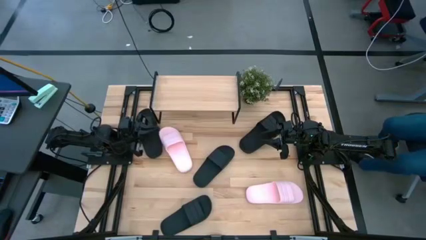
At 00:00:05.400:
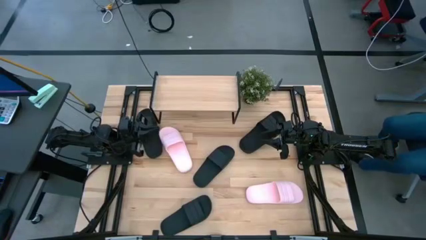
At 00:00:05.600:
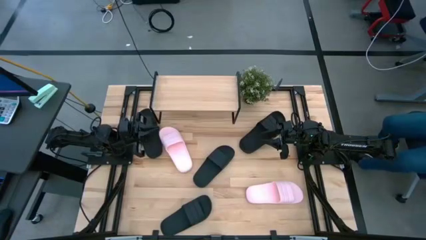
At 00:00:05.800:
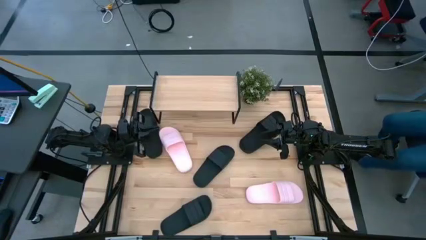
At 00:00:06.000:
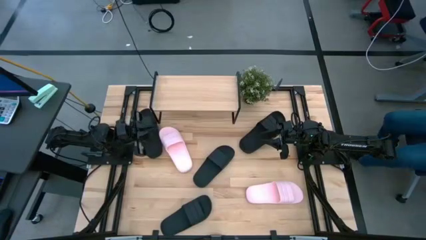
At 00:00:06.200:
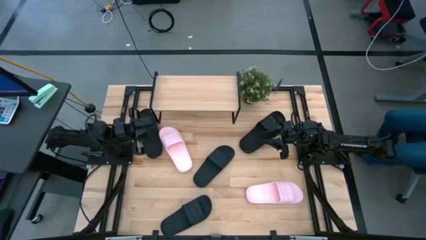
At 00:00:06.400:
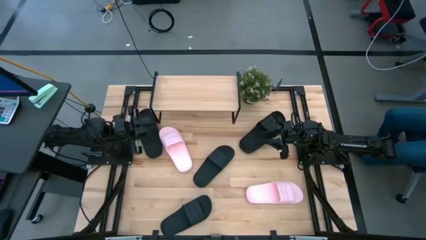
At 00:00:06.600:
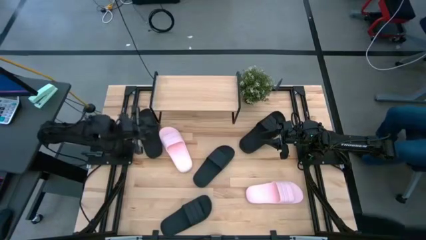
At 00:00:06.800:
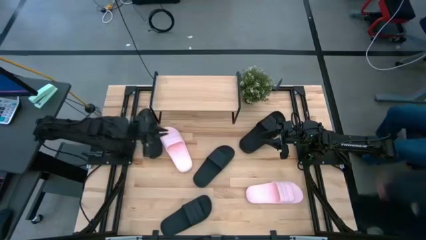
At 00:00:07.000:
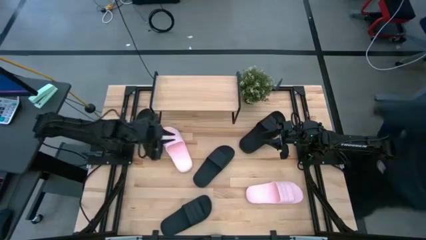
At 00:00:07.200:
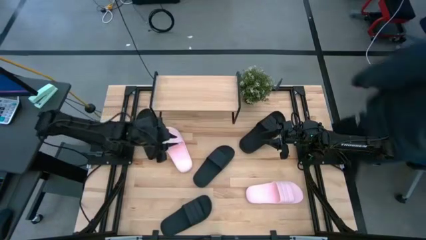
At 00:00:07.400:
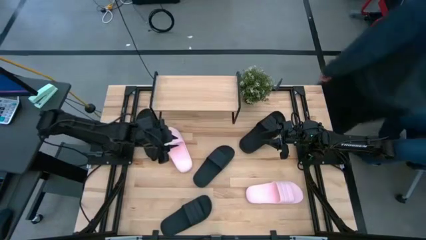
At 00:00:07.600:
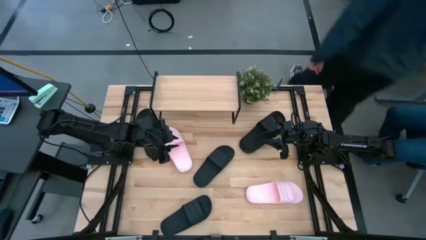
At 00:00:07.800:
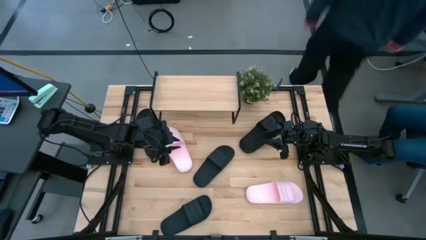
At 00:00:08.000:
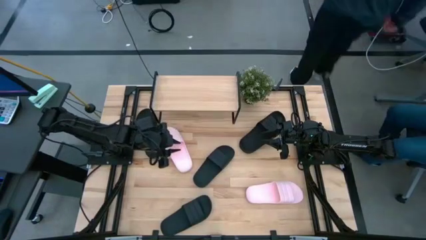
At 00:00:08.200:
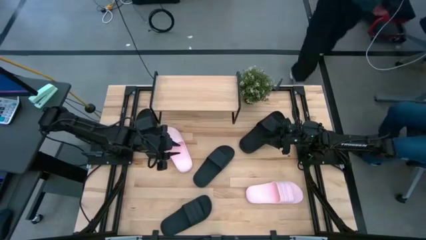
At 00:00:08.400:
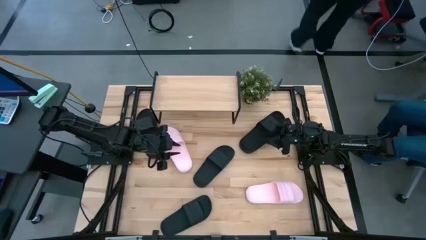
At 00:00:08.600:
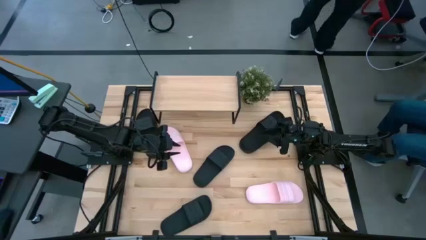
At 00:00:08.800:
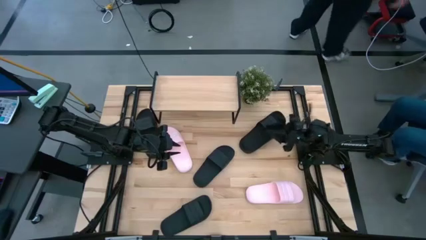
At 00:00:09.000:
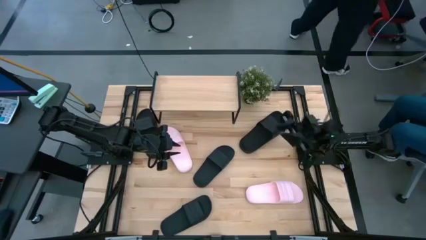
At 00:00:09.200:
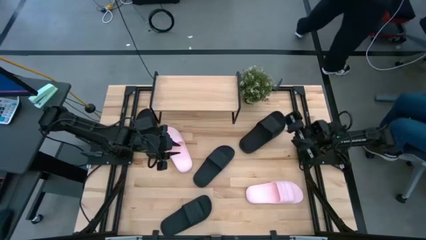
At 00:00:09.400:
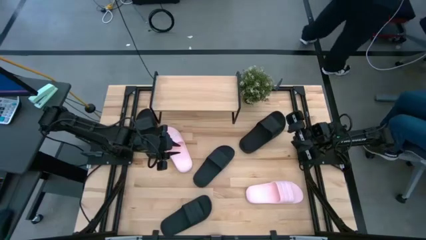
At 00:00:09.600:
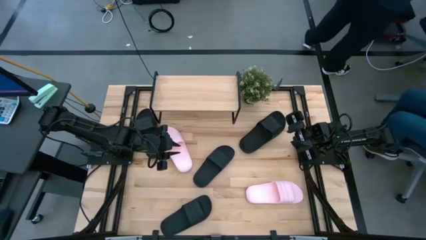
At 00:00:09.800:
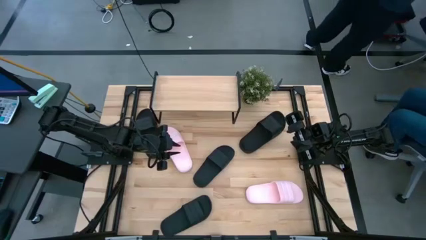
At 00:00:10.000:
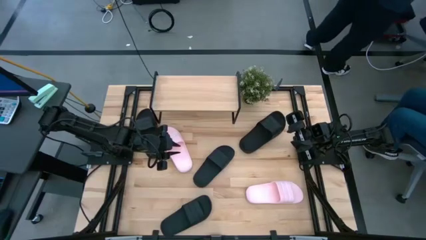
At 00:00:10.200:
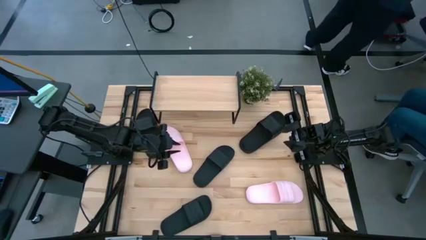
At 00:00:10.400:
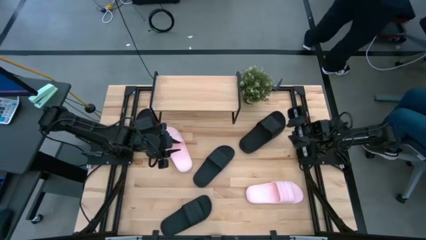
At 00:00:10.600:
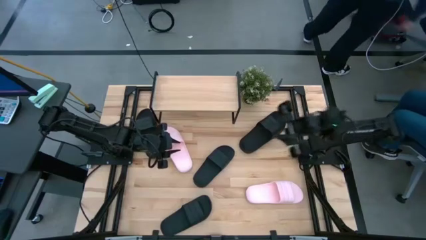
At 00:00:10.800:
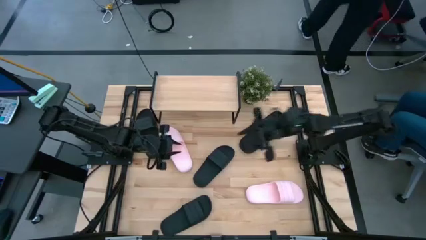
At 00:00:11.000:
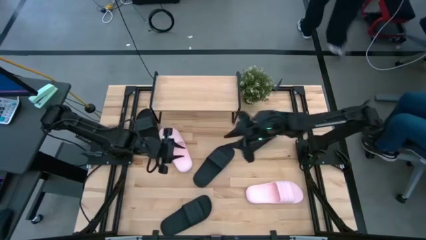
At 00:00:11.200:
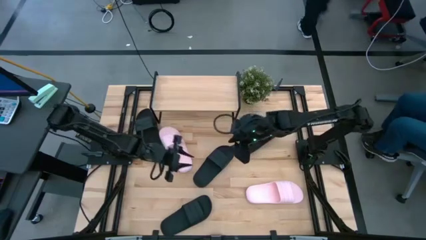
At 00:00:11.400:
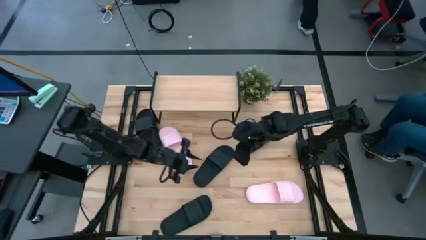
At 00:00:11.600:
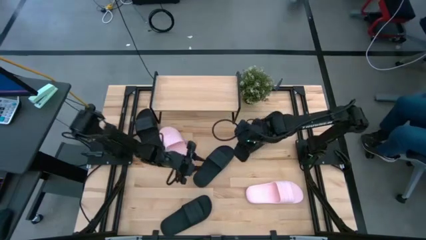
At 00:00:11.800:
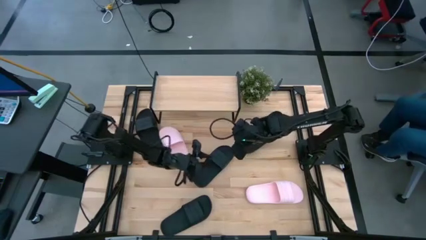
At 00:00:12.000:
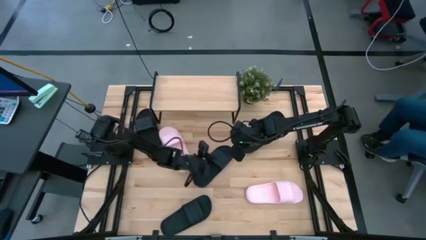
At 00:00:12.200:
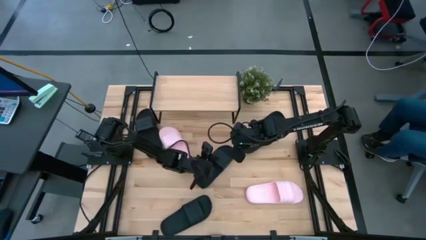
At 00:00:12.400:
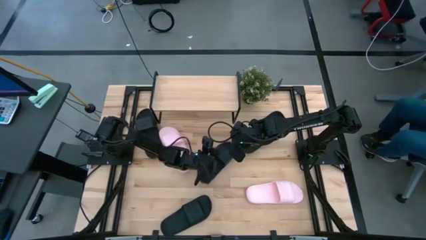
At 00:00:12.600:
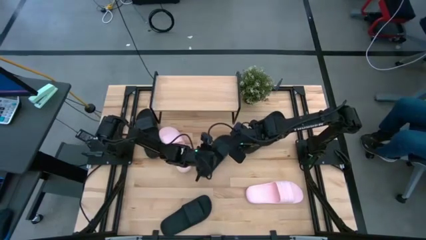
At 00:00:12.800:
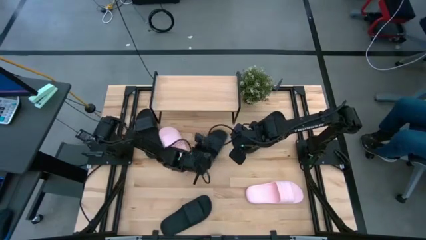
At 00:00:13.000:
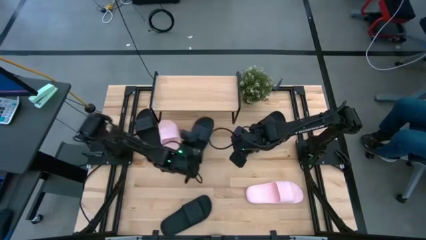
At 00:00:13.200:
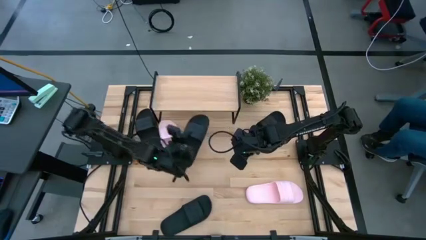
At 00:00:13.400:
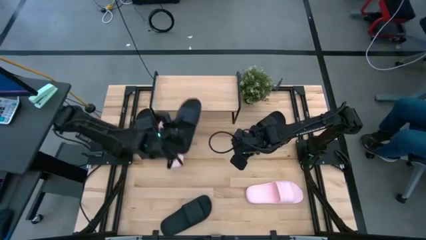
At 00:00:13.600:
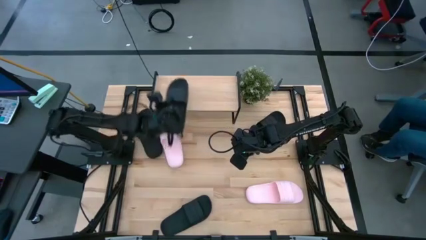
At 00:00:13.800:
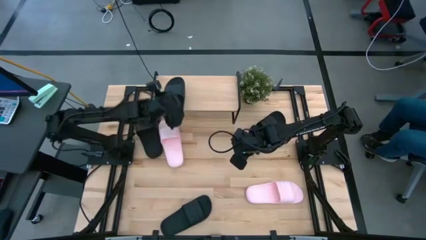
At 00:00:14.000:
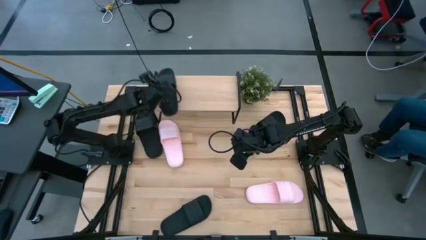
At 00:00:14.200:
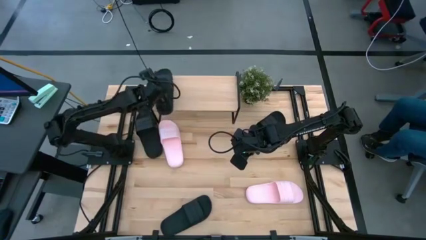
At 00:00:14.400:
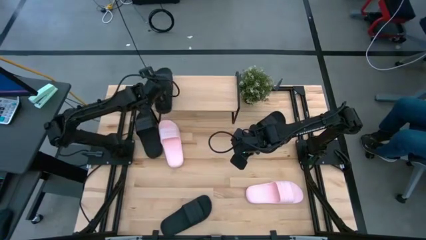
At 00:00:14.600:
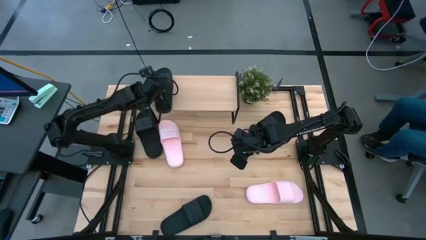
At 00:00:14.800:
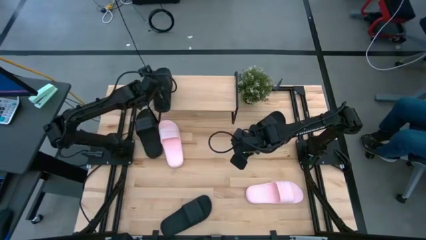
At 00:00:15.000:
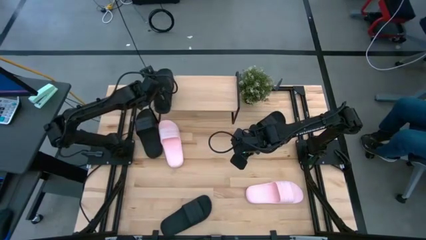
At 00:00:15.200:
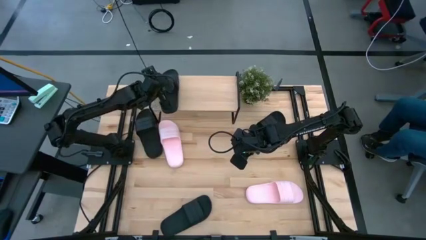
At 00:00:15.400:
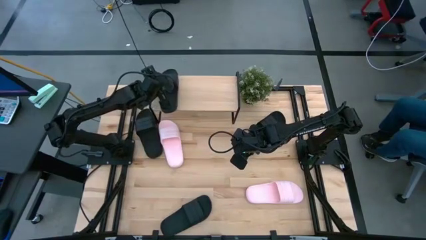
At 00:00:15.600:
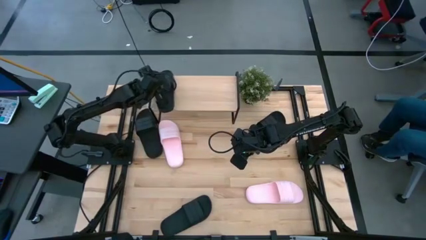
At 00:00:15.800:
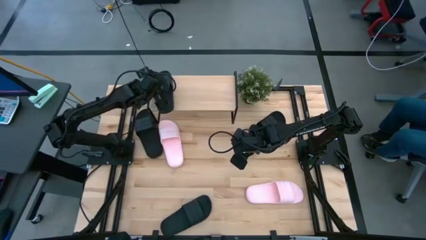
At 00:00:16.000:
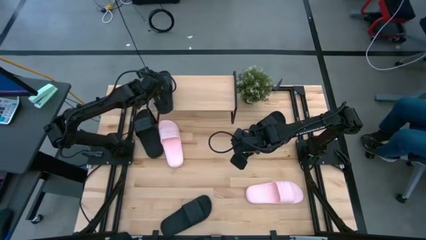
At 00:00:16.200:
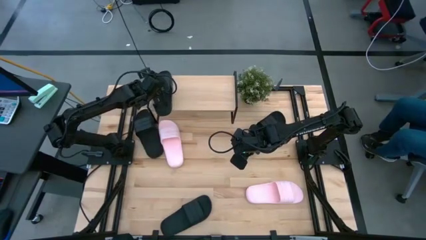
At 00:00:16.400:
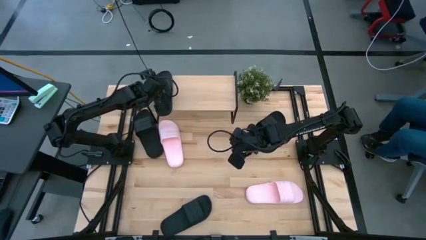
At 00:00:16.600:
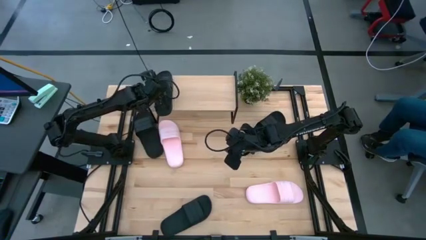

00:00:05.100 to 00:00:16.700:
Task: Pick and place slides into the shelf
Put the middle black slipper on the shelf
